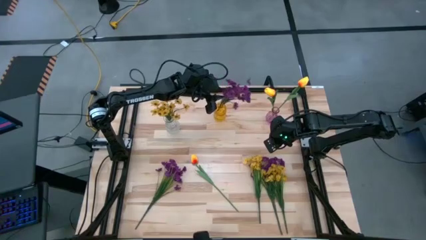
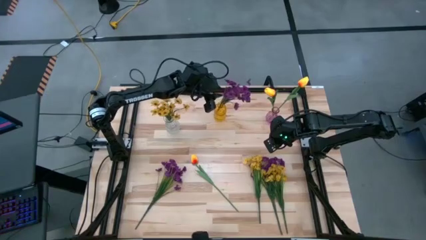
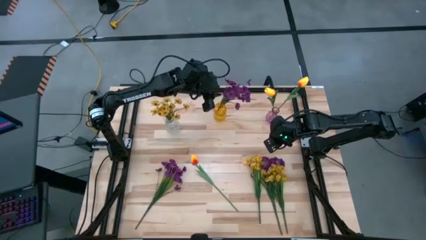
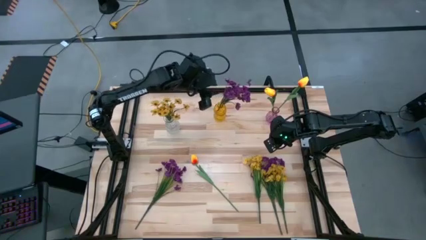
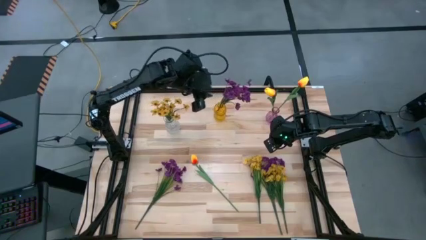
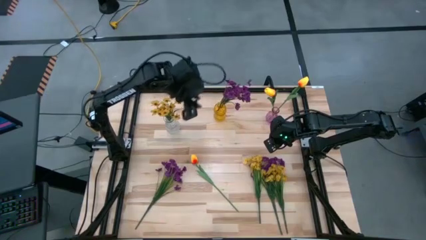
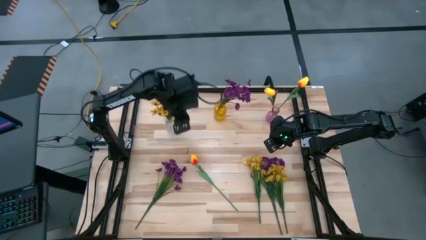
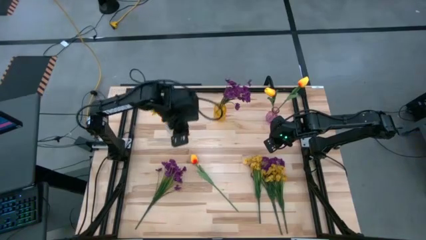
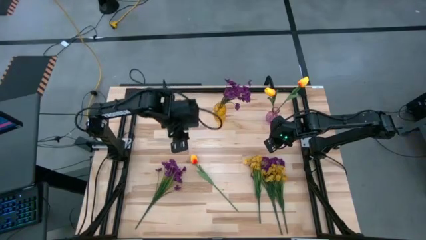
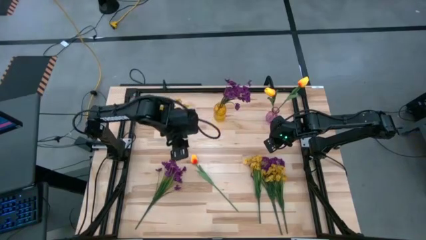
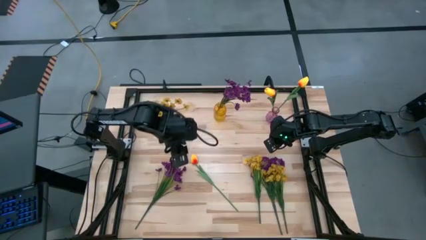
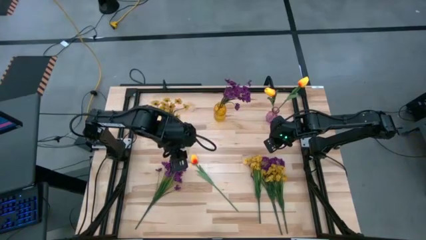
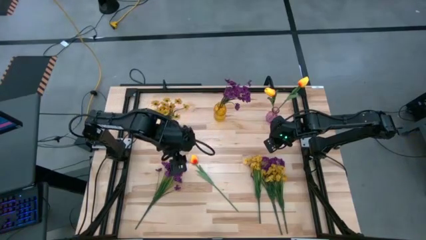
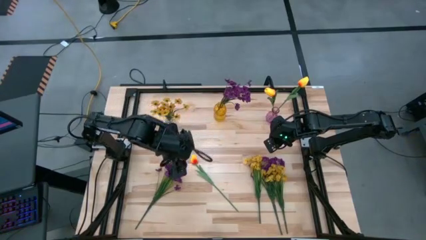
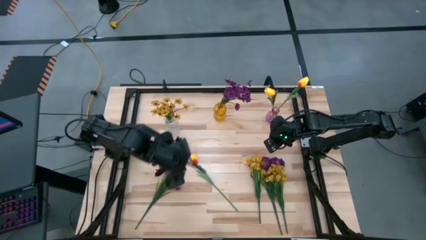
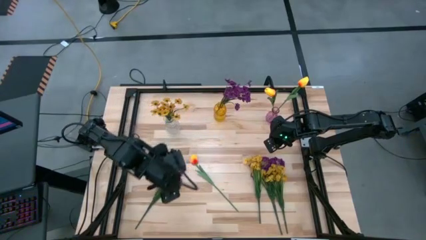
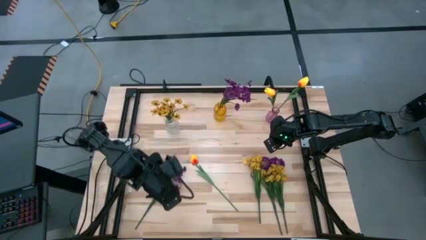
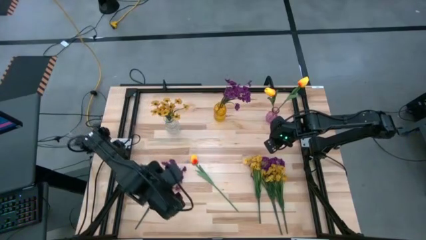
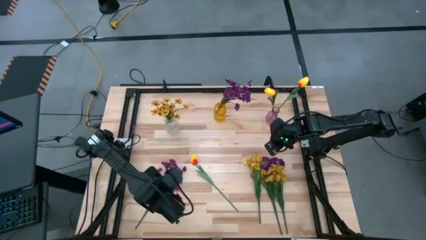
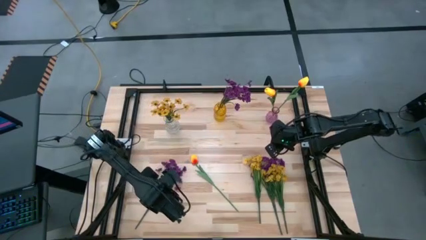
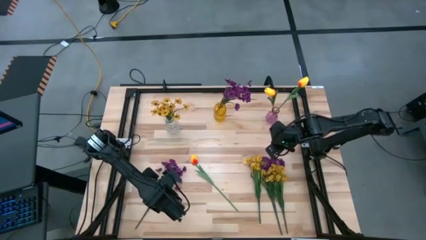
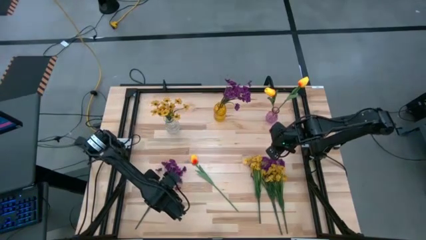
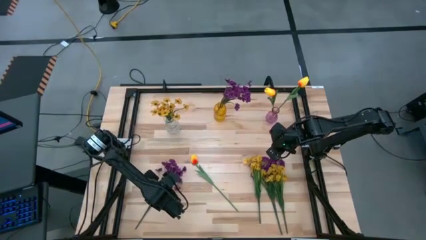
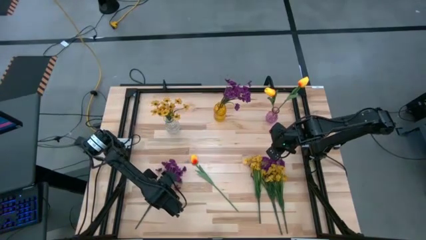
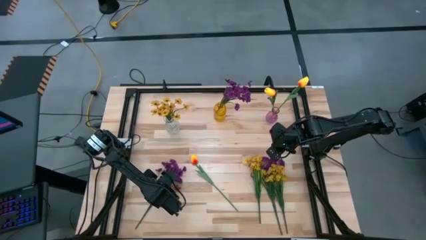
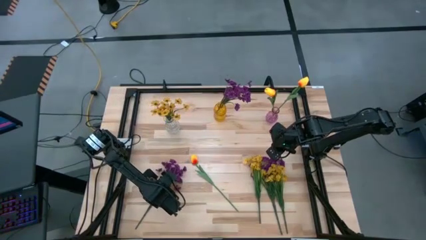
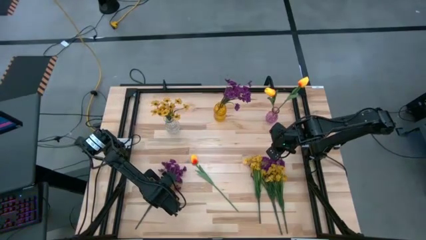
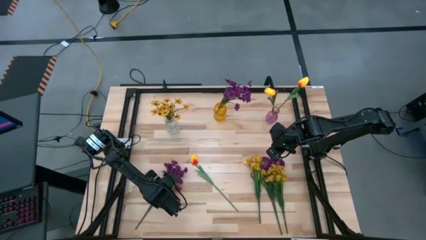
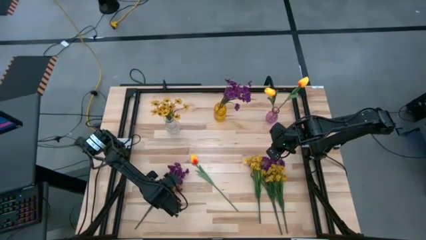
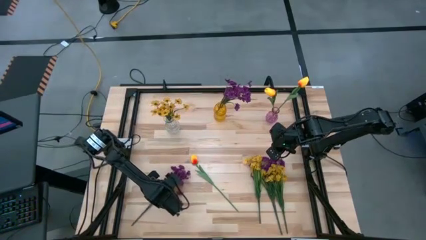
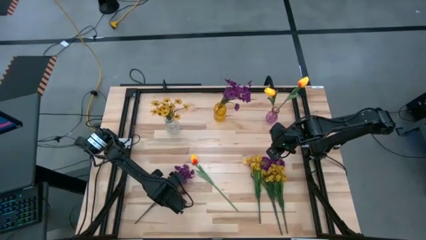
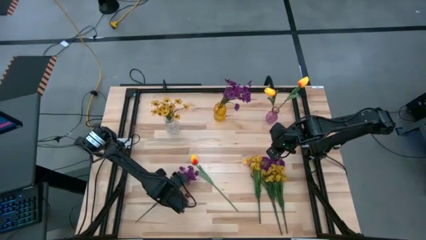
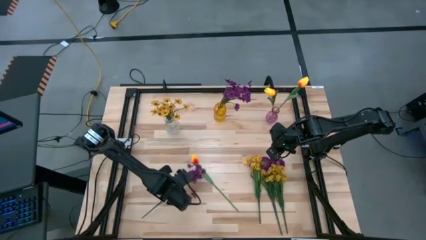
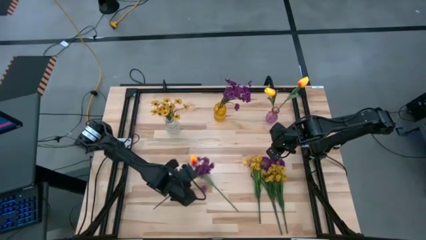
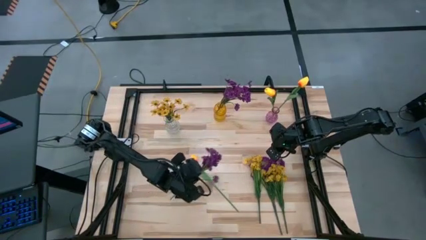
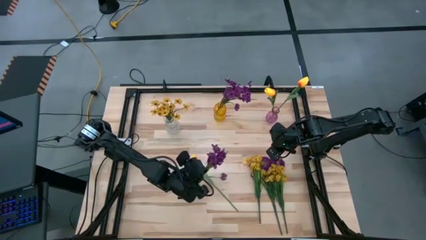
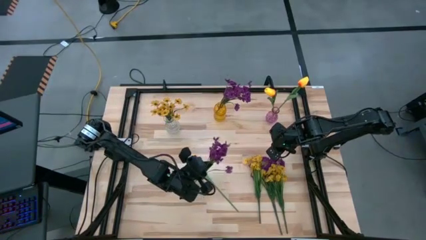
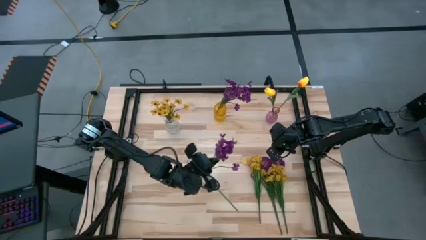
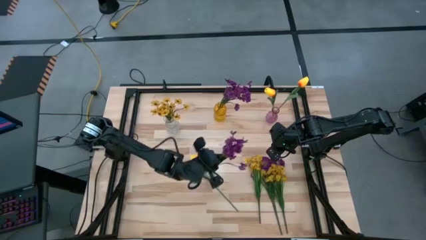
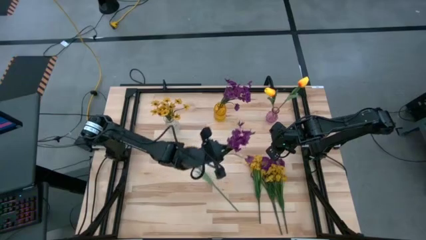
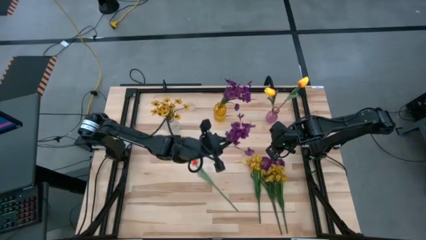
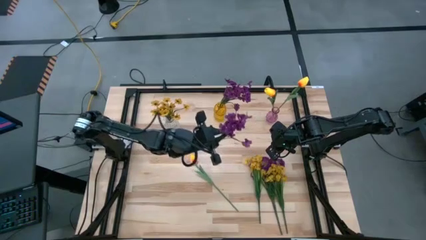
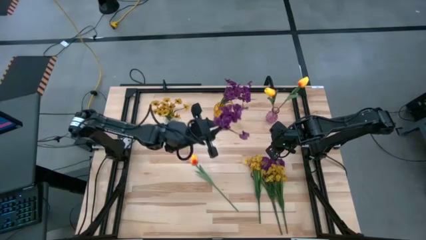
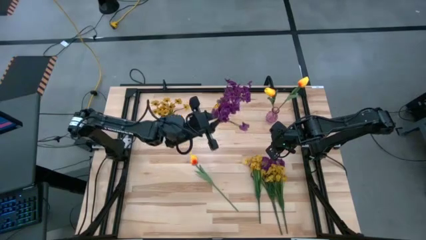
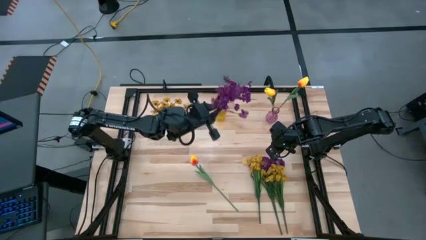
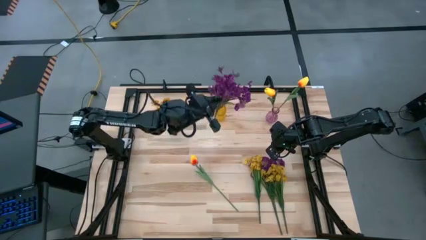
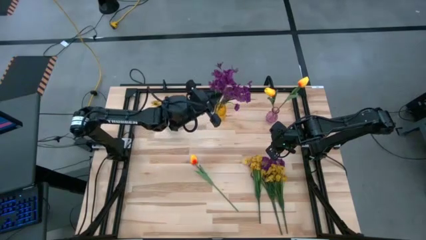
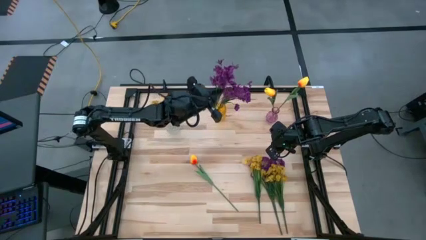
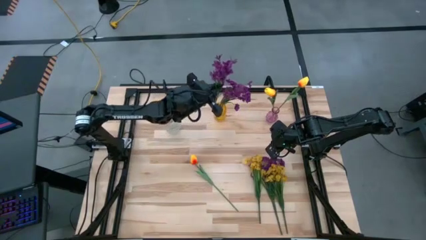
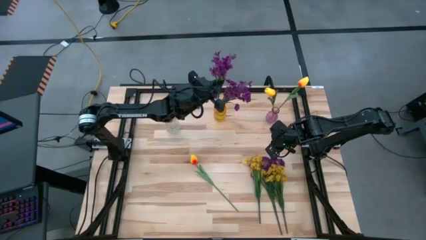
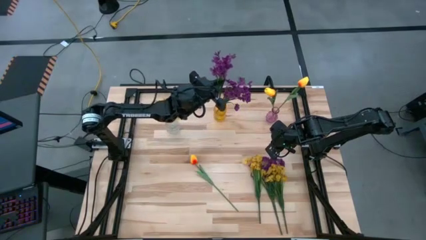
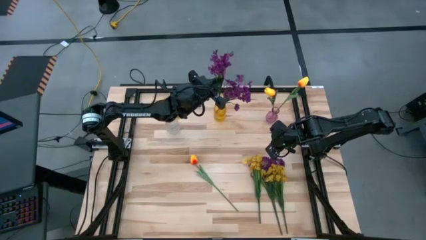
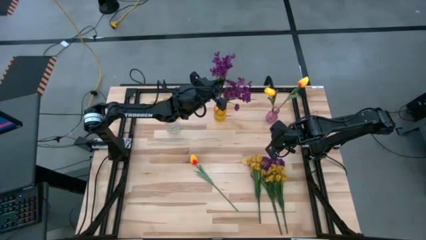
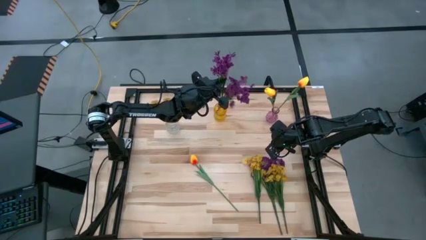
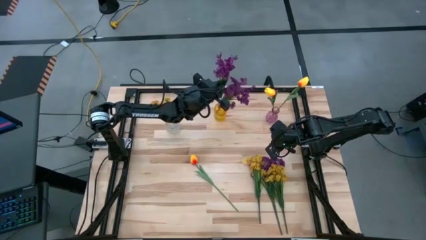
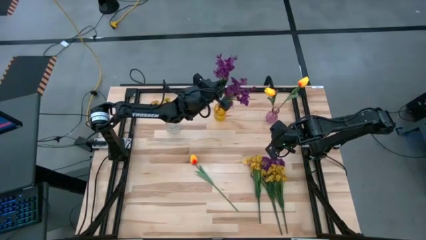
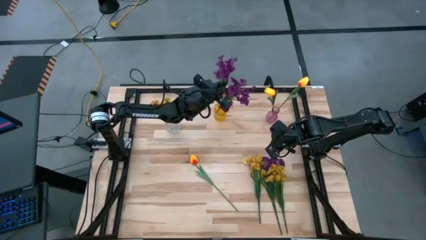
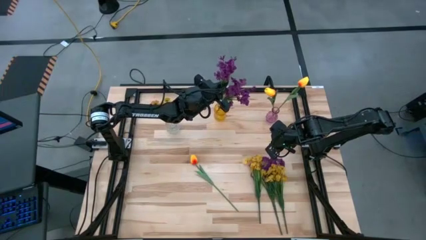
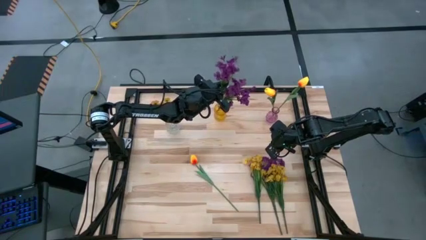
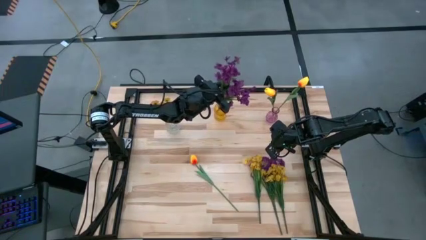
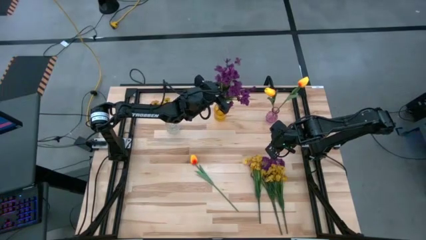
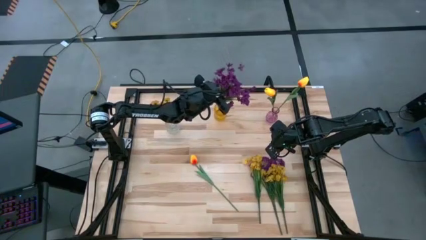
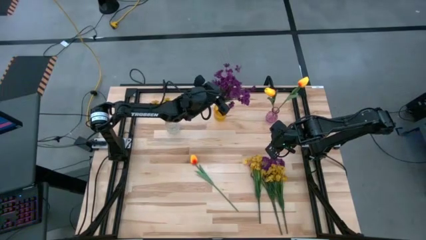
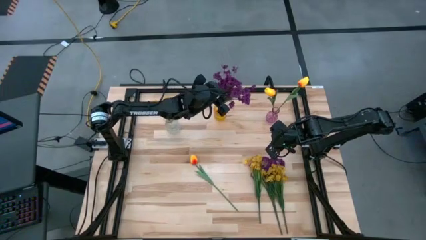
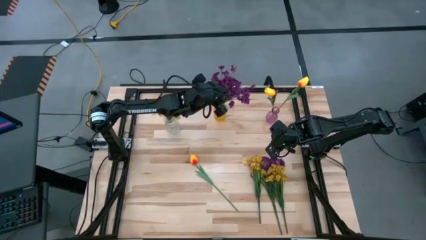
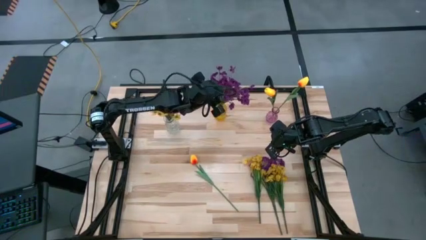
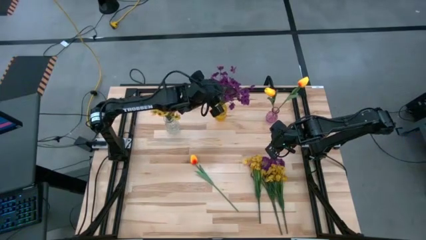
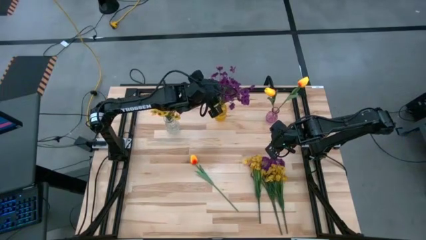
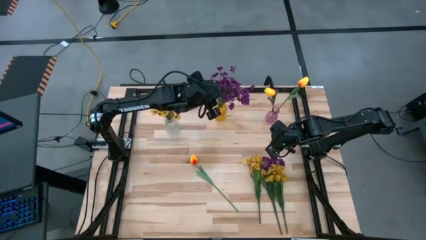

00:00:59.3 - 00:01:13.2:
Task: Sort flowers into vase by color
Put the left purple flowers into the yellow vase

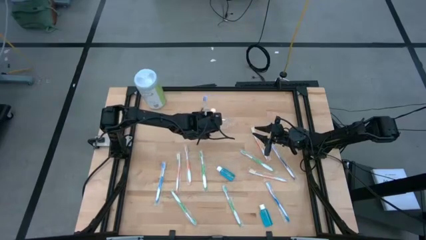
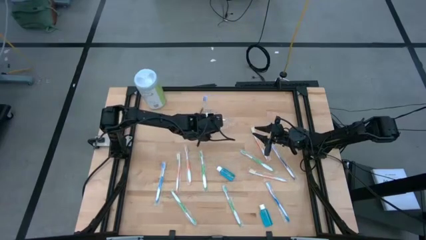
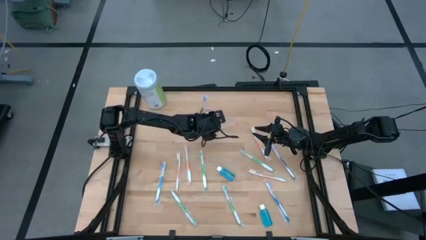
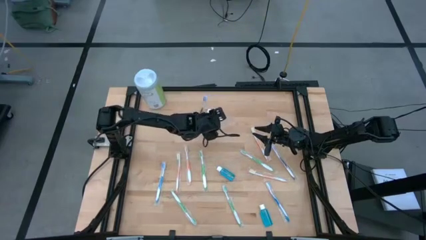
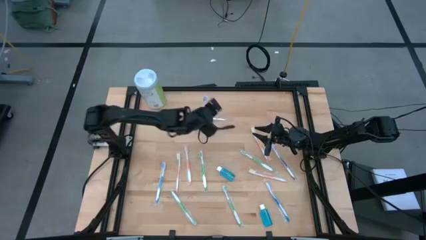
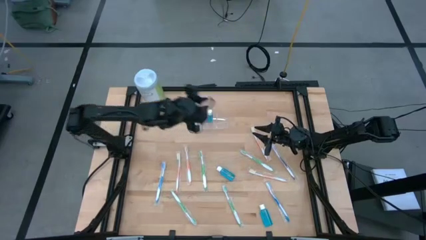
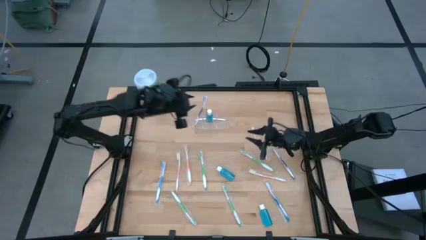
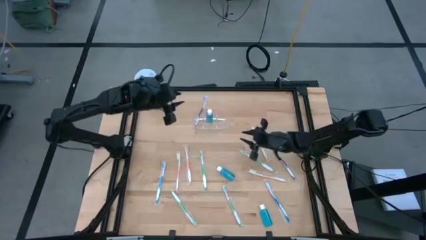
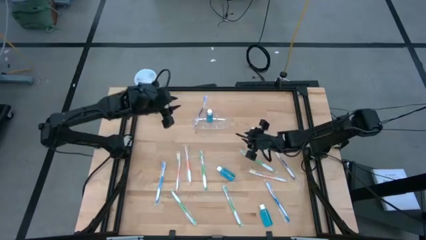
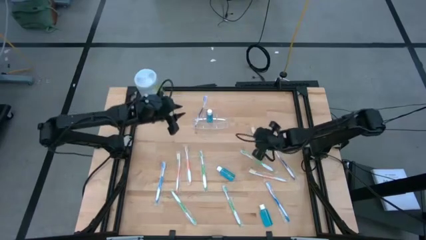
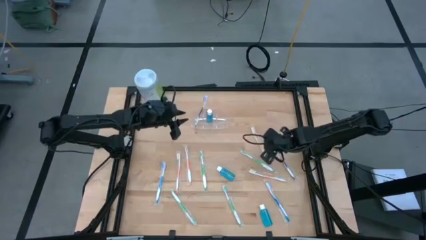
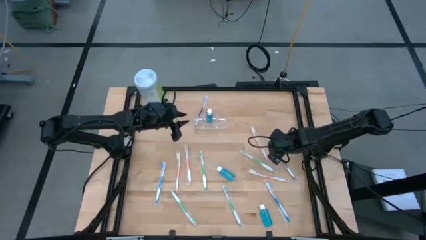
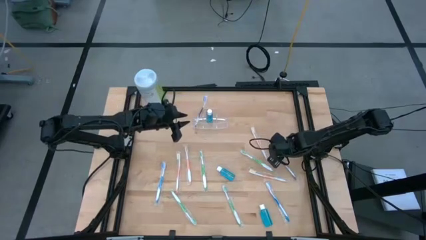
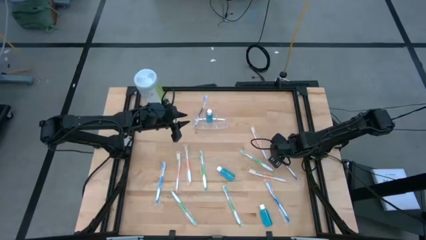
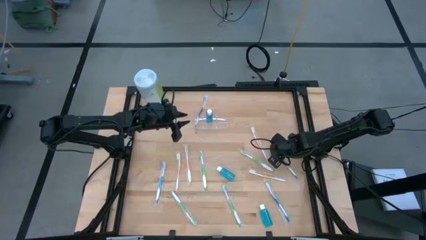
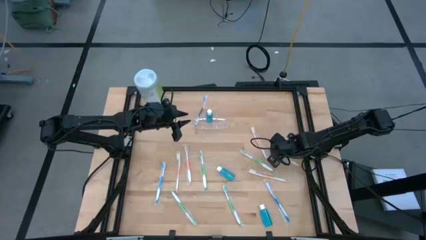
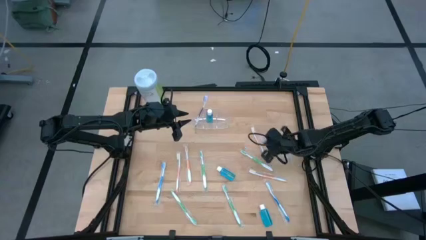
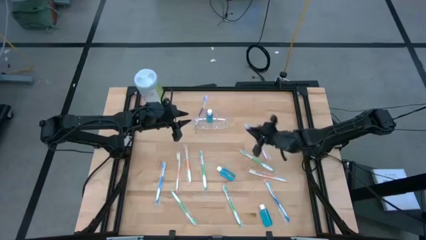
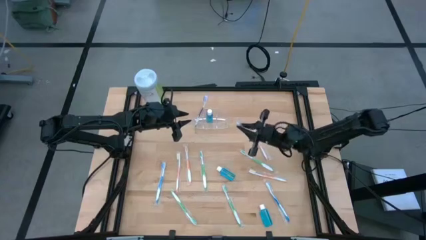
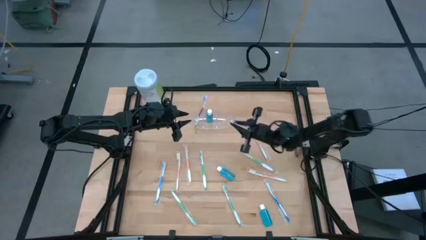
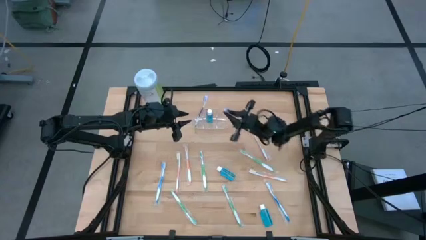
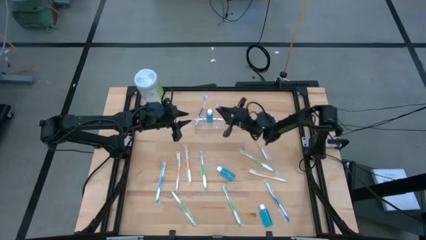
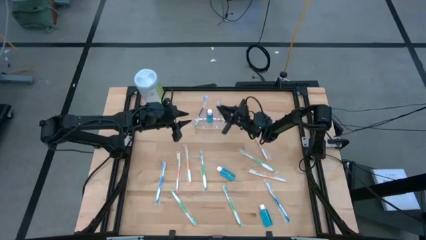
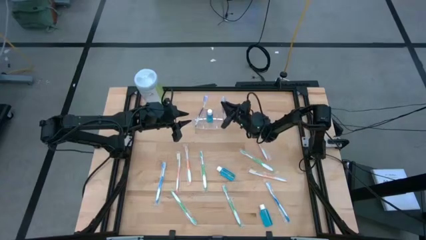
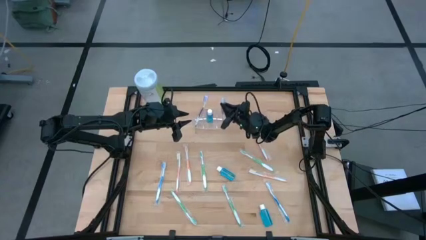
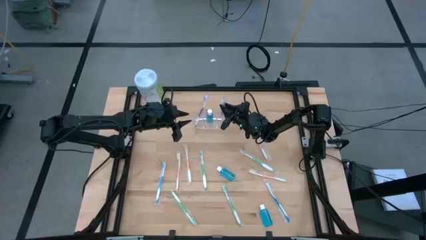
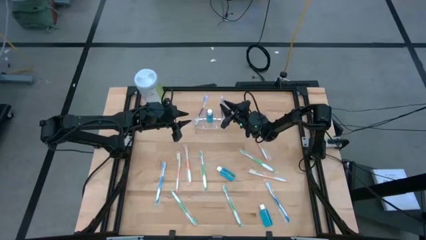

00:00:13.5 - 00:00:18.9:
Task: Pick & Place toothbrushing station
Put the purple toothbrush to the right of the transparent organizer
